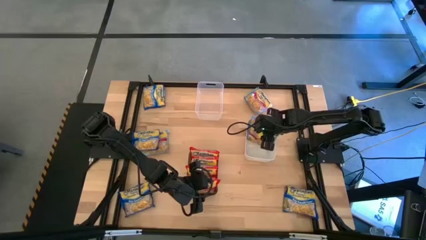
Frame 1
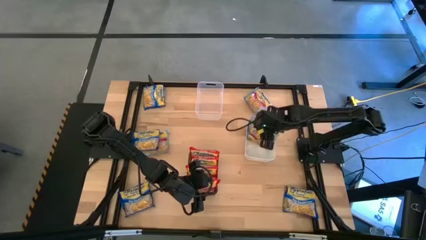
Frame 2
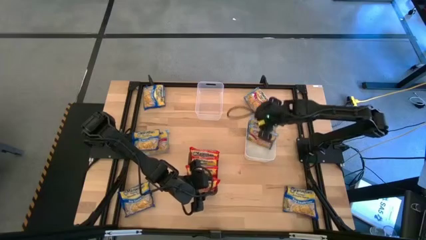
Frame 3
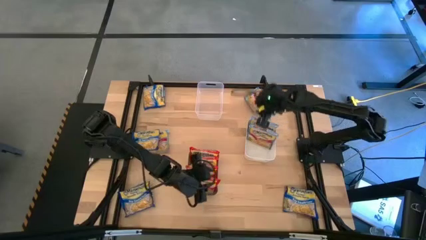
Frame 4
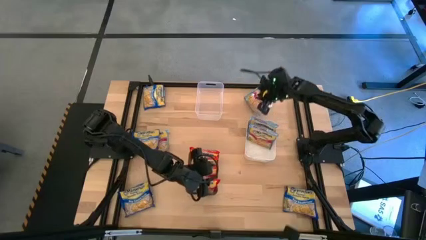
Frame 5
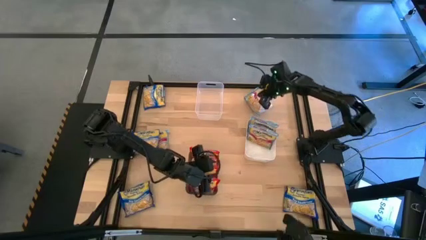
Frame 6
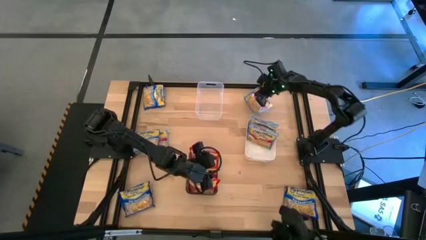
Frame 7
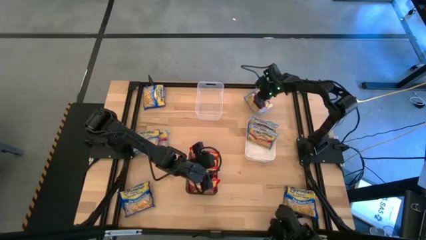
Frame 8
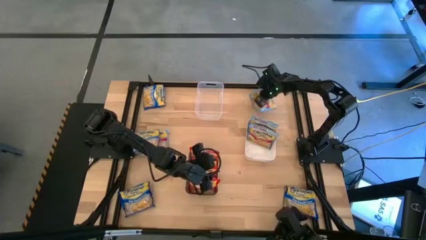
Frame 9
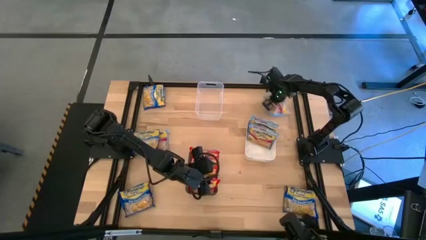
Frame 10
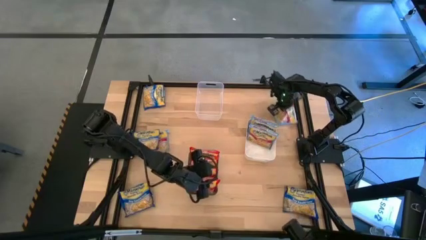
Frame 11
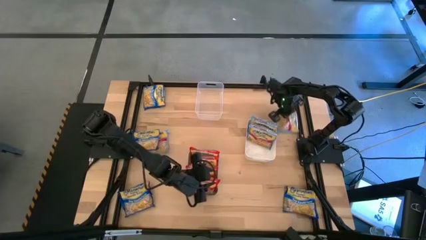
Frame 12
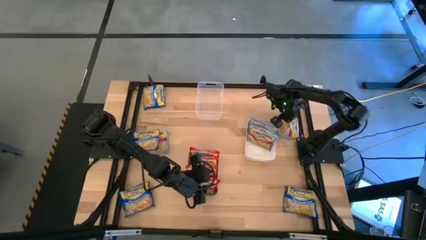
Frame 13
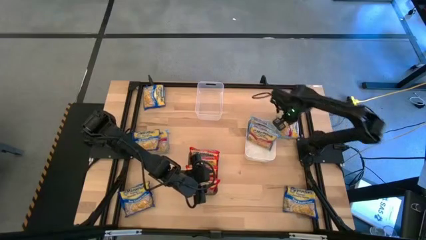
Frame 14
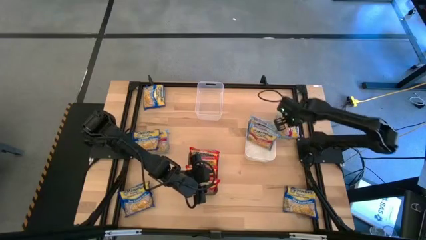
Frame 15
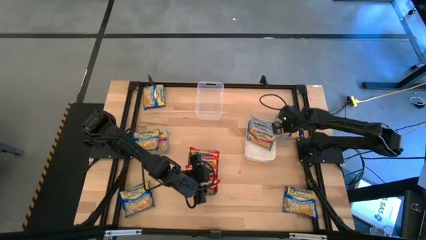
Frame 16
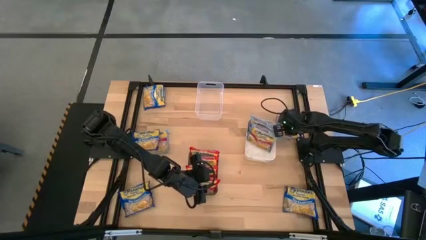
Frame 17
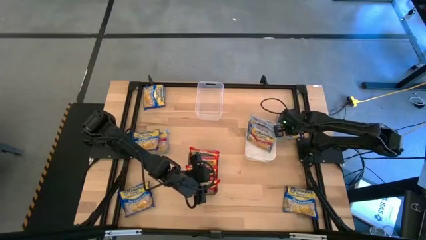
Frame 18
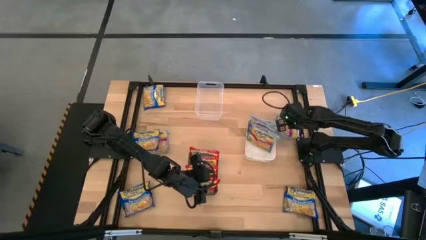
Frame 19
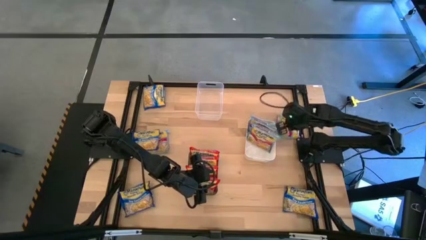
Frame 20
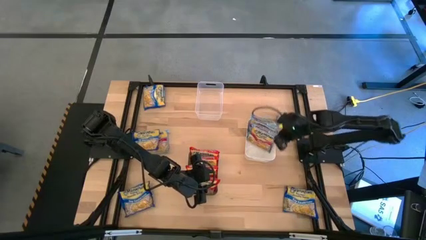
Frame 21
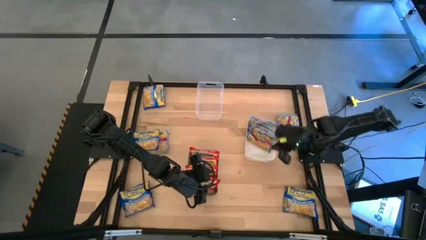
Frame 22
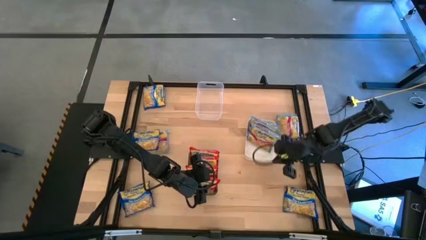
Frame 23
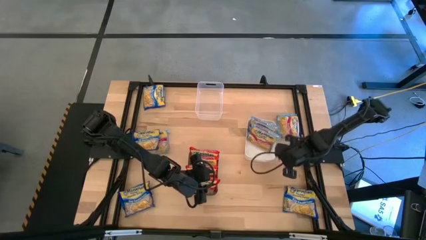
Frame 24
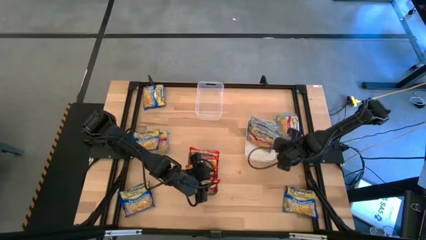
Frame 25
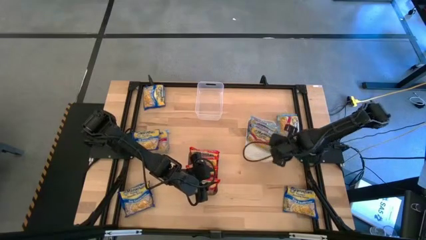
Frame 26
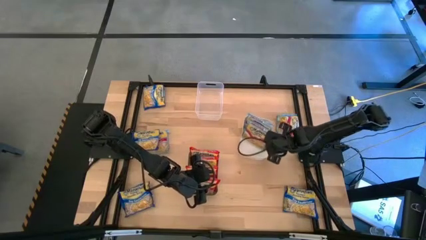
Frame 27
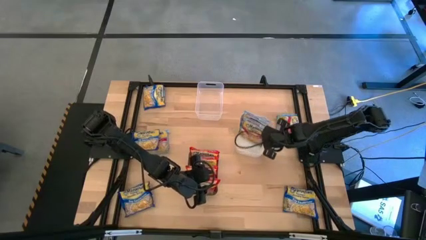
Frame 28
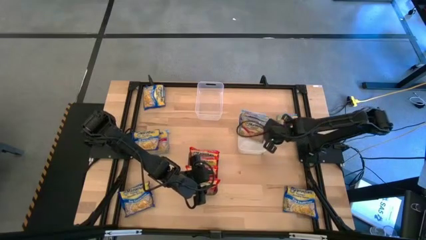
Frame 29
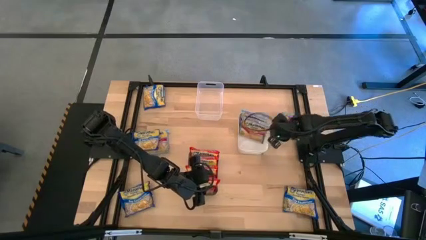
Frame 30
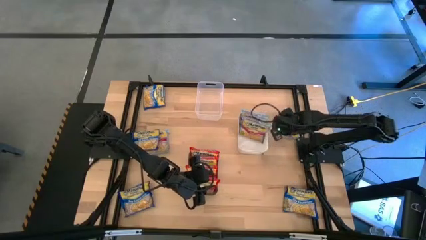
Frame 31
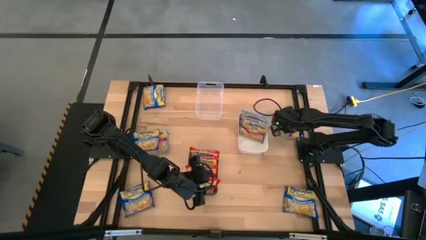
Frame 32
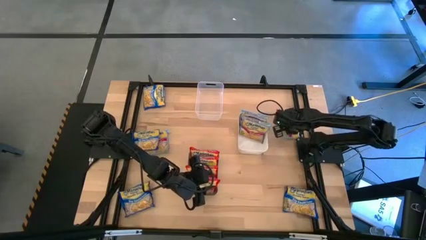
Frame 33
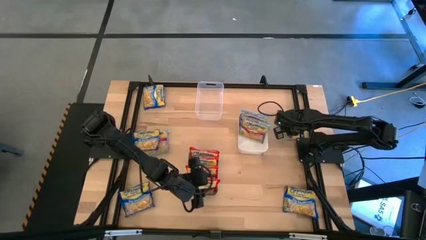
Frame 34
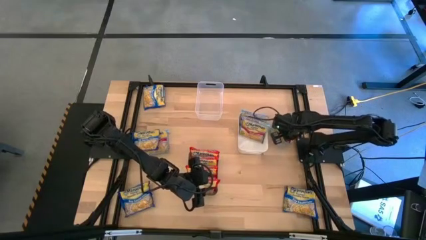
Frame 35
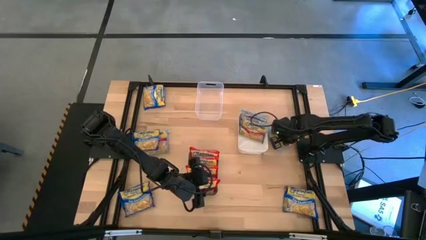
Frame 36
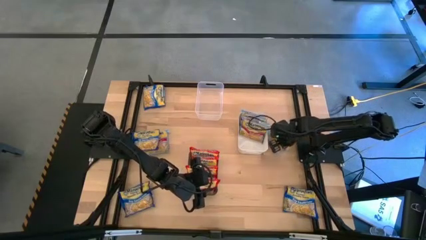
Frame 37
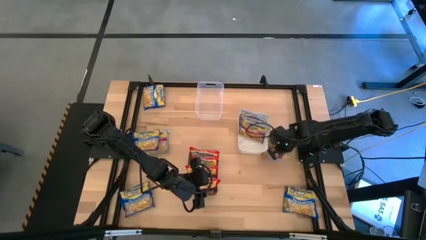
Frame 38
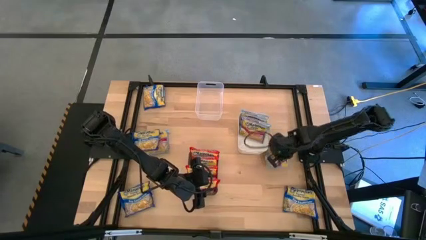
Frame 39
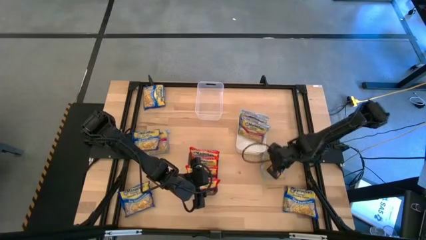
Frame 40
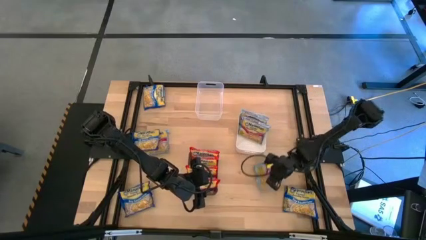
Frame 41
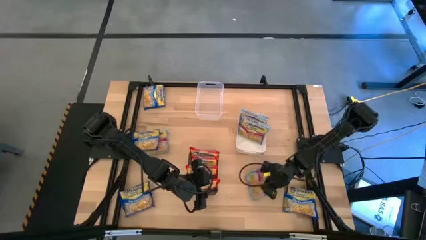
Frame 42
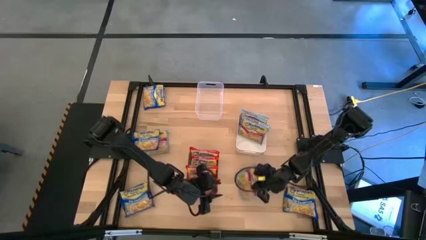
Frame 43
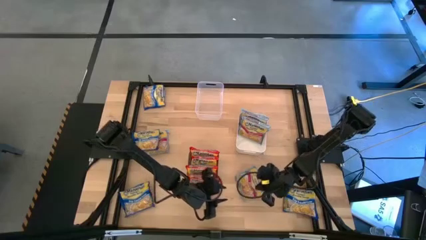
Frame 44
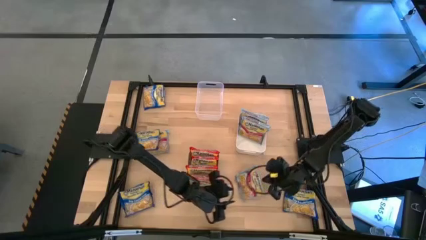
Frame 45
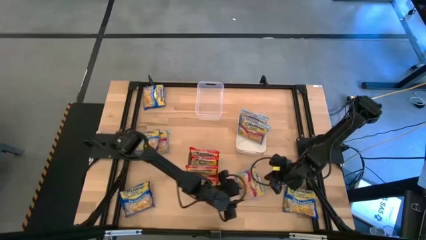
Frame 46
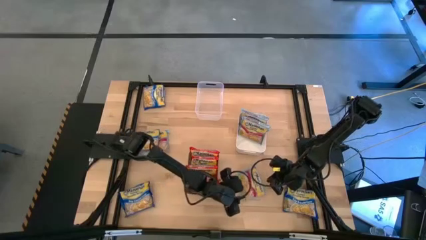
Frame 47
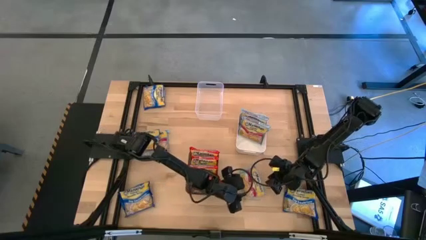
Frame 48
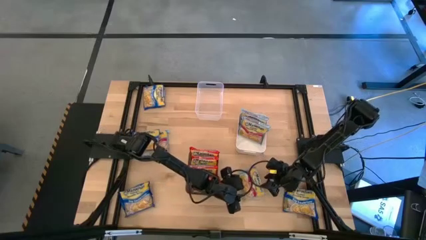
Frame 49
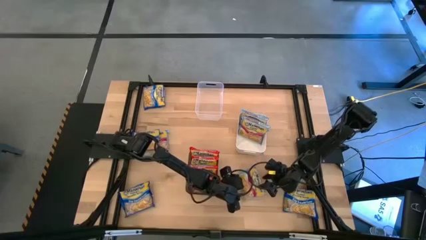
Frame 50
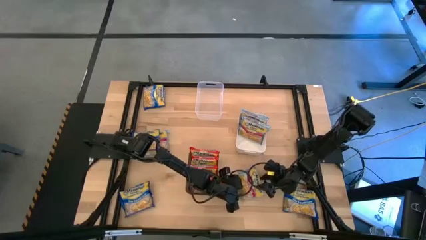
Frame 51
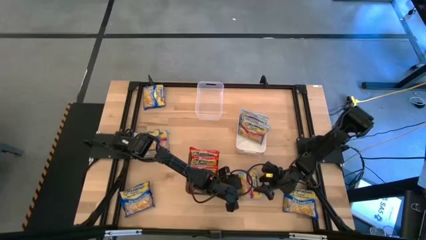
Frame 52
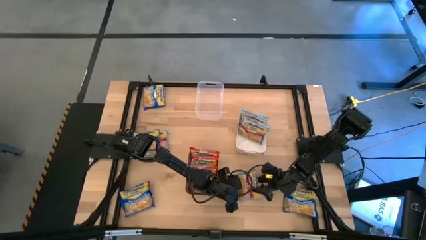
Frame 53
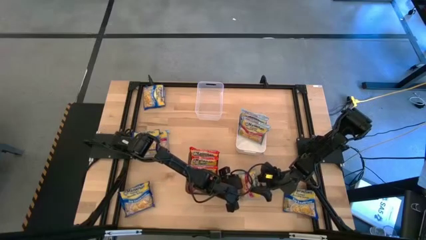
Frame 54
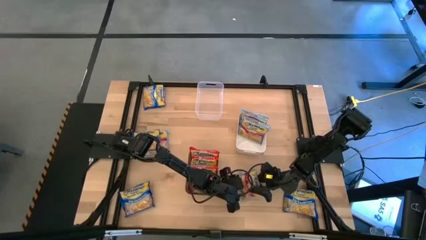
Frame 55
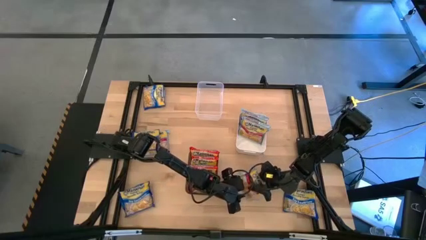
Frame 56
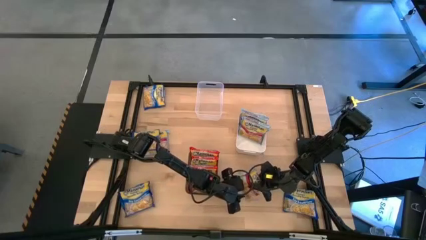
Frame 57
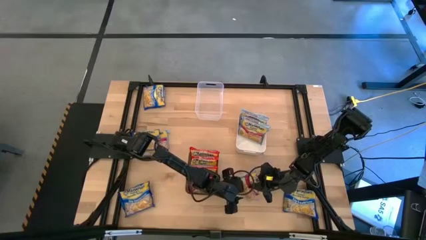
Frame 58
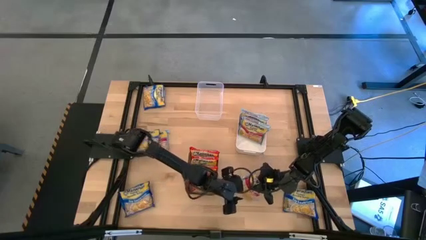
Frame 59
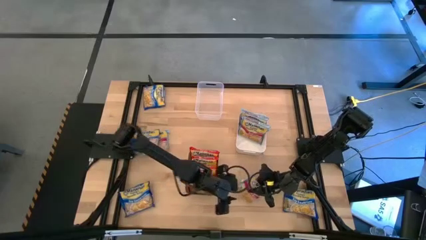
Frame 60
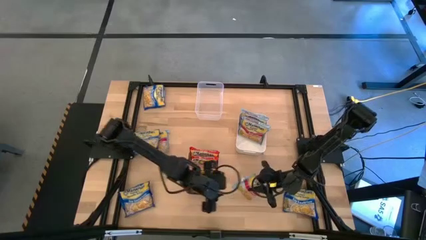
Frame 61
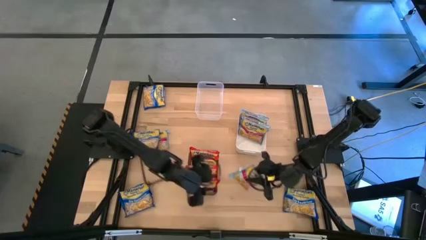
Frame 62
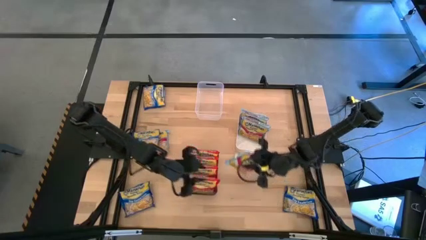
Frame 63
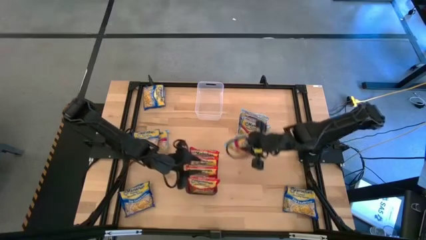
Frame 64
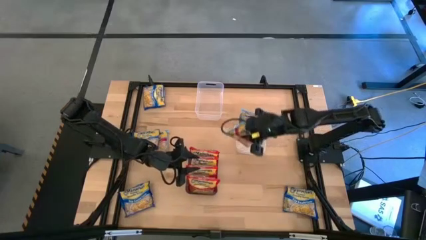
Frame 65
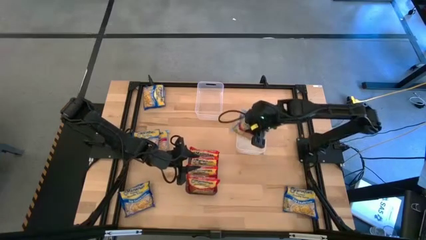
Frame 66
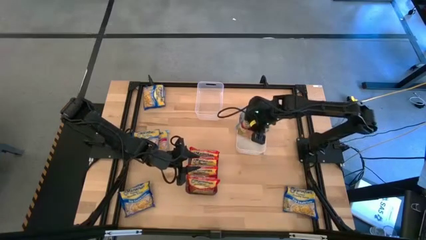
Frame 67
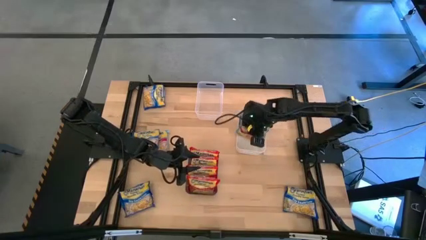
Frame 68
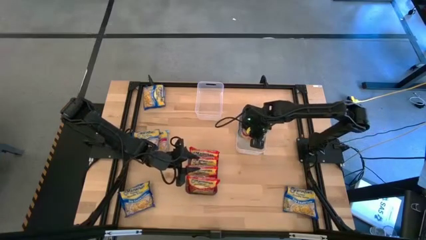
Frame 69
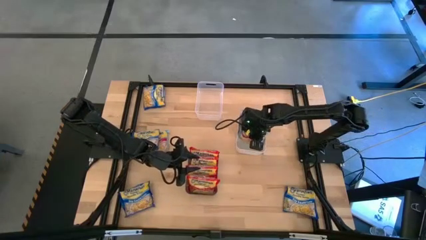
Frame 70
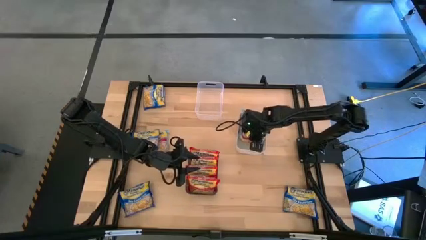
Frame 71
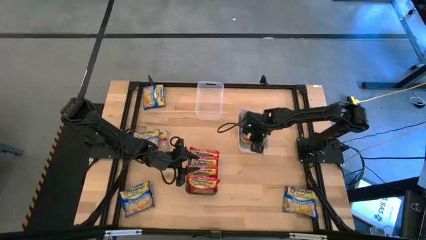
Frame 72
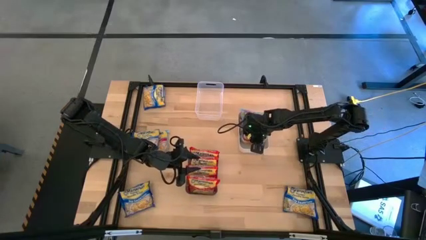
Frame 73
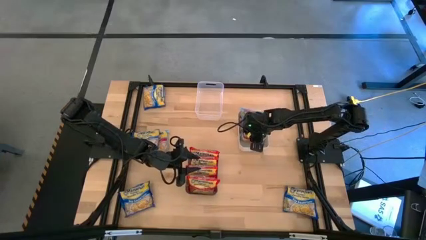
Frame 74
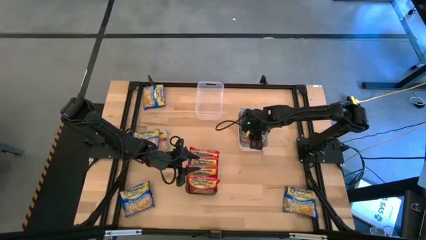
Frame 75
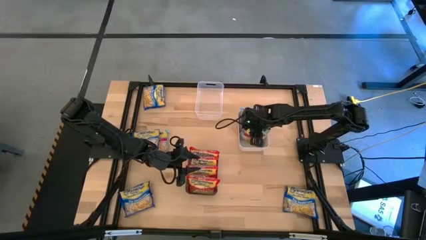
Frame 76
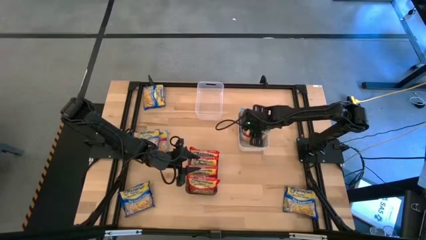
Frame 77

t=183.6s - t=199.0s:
Task: Sort Maruchan noodles
Put the light blue noodle pack into the white bin

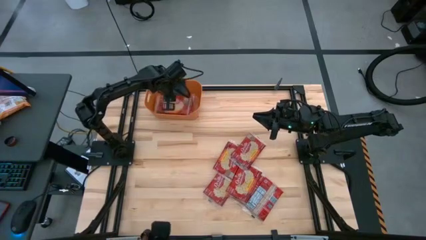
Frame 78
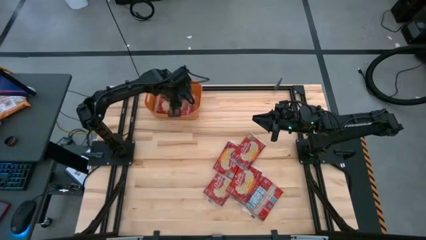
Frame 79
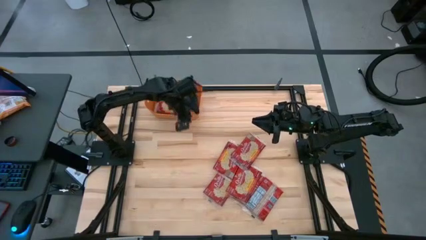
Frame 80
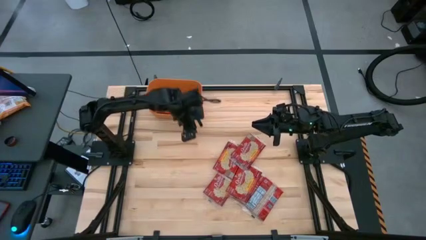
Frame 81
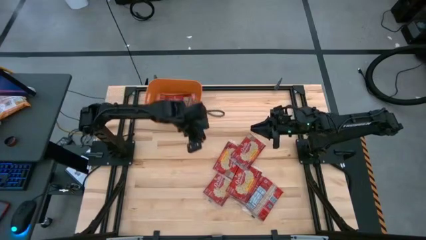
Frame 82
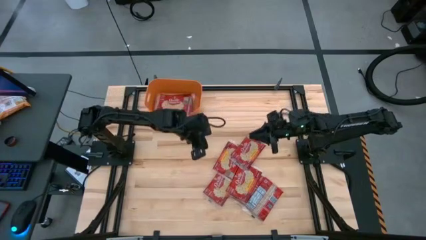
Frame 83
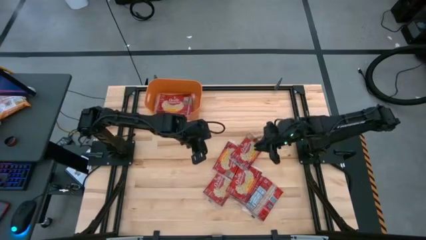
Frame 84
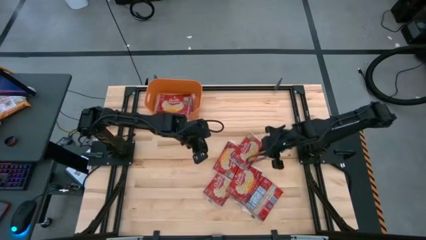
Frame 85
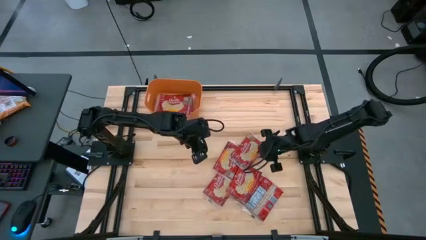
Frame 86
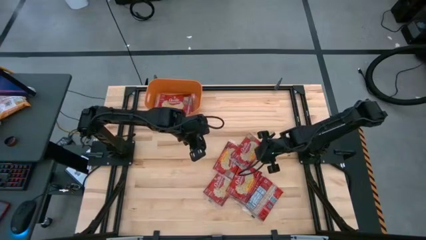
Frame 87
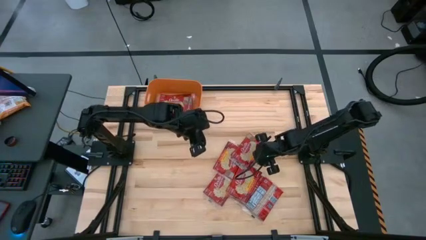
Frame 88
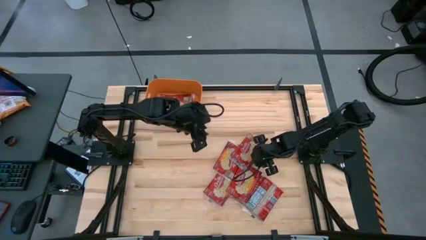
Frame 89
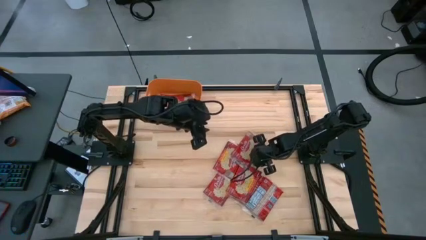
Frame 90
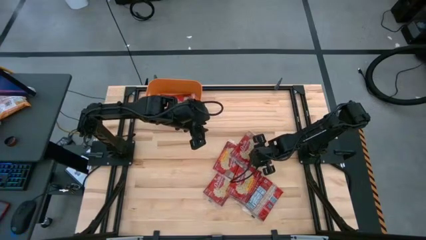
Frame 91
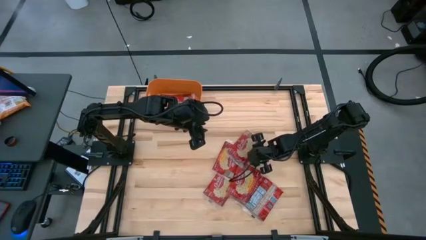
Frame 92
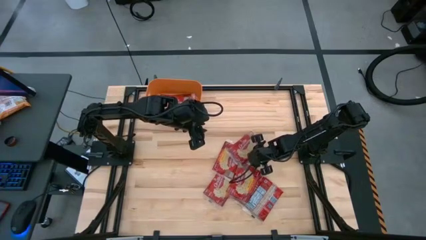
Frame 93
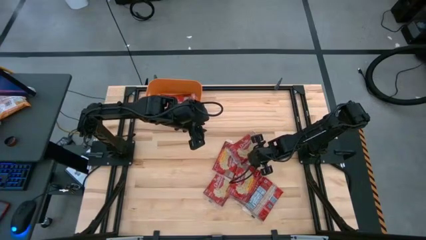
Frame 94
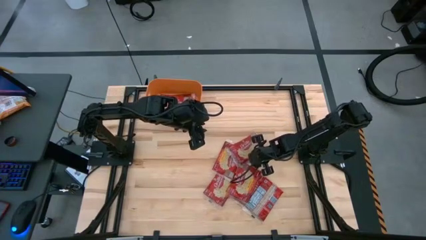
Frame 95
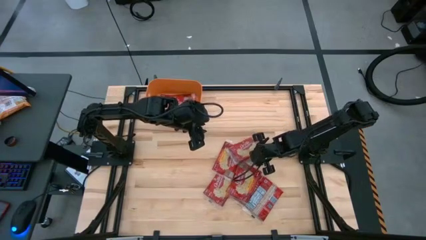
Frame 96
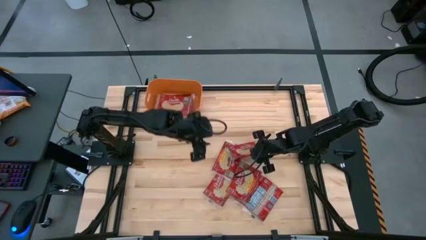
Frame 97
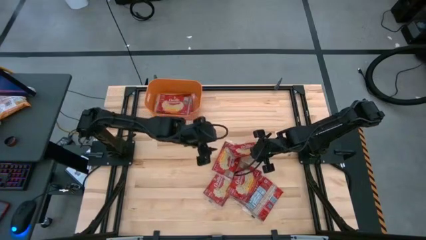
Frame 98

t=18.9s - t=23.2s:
Task: Sort popcorn bags into baskets
Put the red popcorn bag into the orange bin
